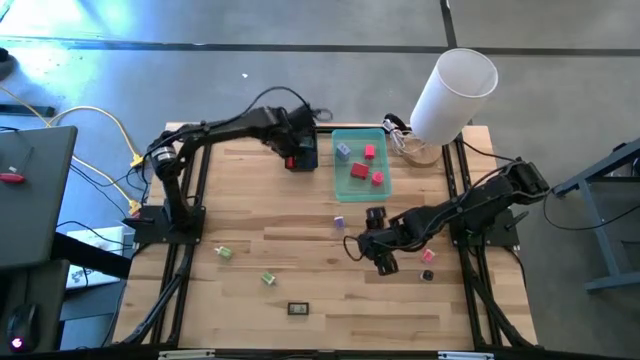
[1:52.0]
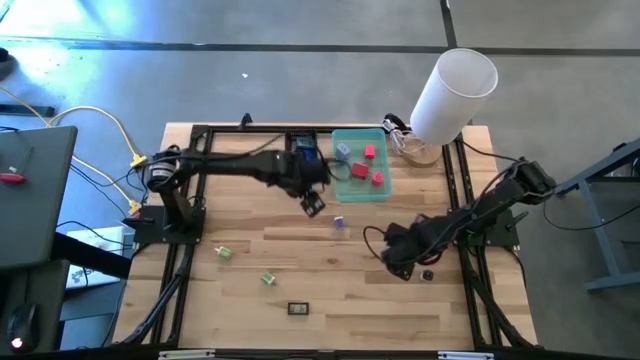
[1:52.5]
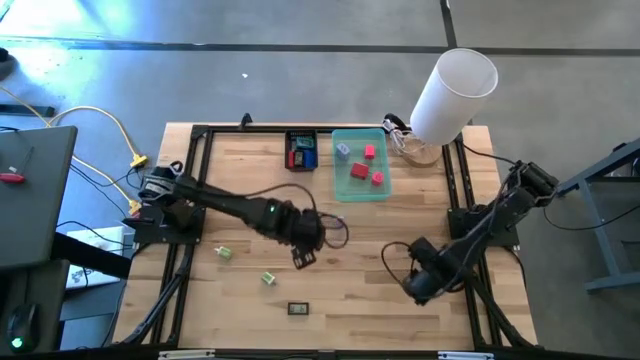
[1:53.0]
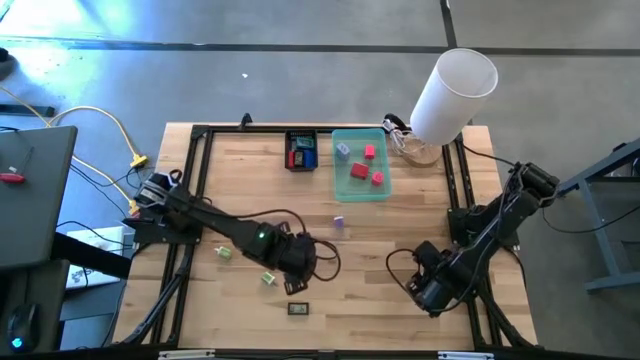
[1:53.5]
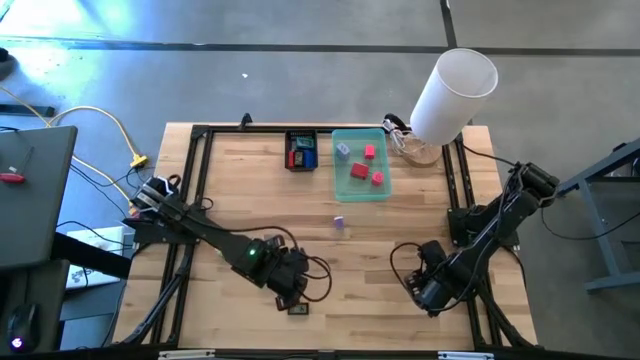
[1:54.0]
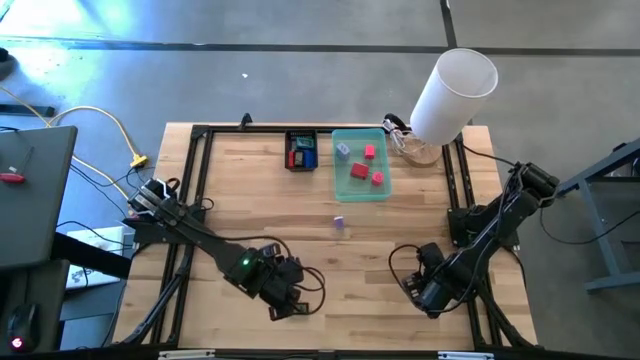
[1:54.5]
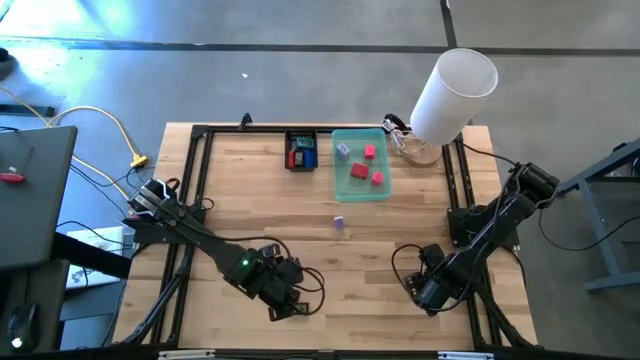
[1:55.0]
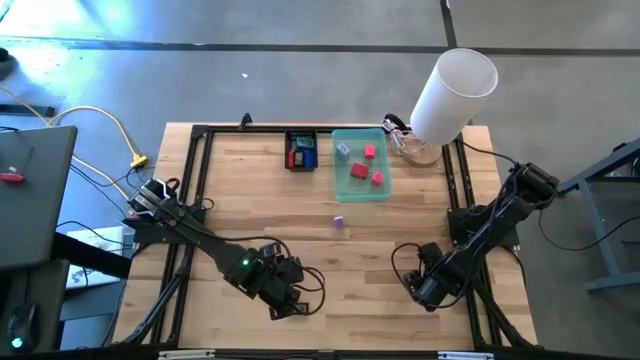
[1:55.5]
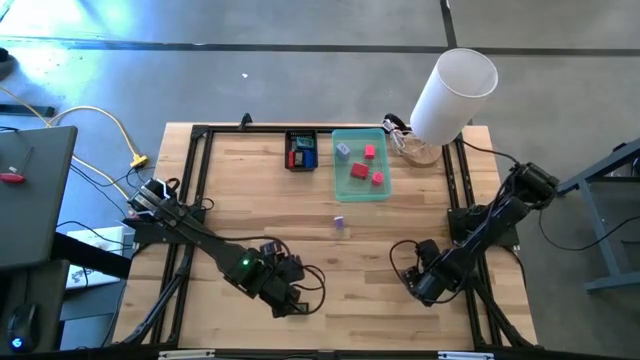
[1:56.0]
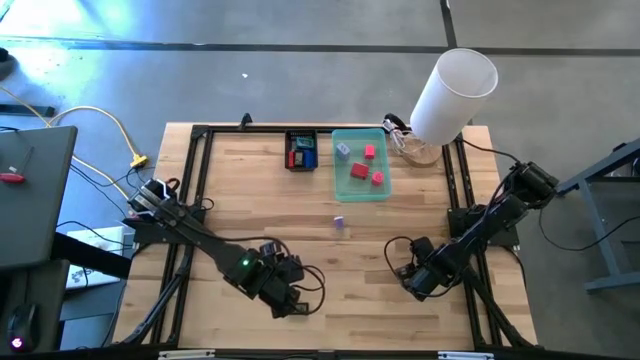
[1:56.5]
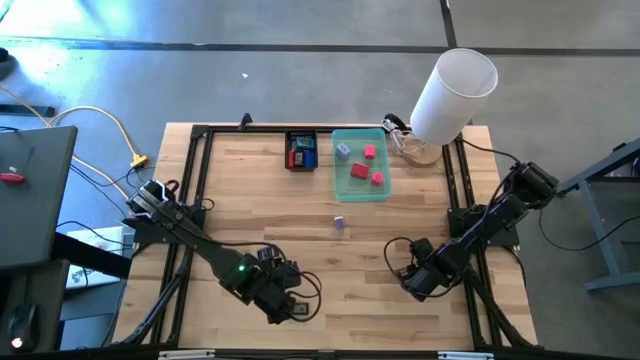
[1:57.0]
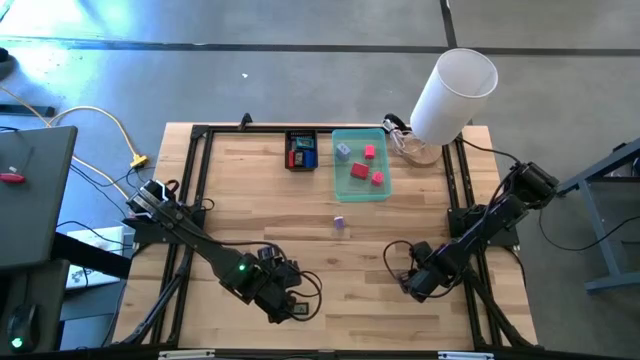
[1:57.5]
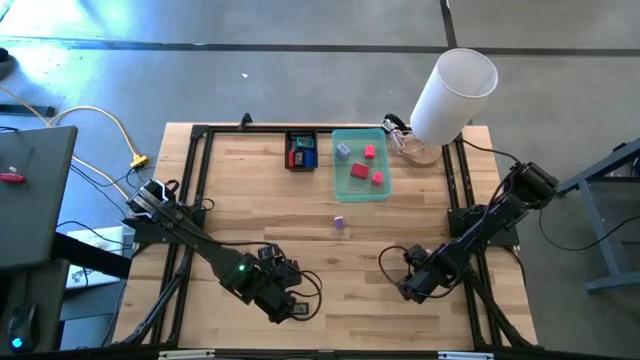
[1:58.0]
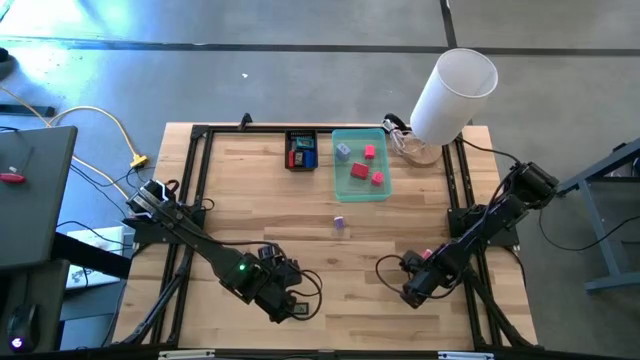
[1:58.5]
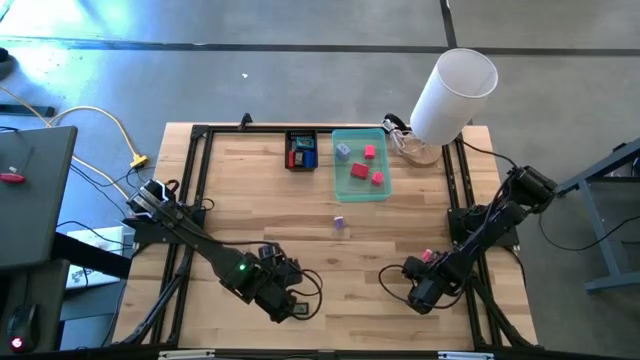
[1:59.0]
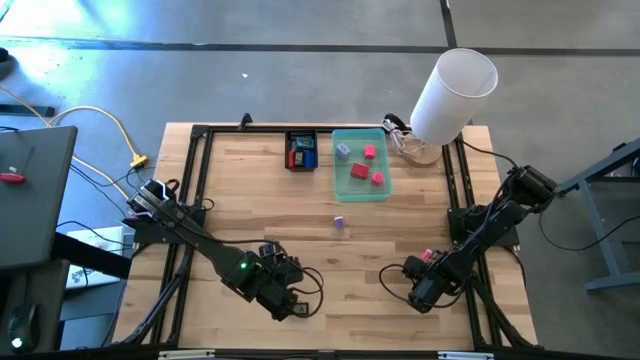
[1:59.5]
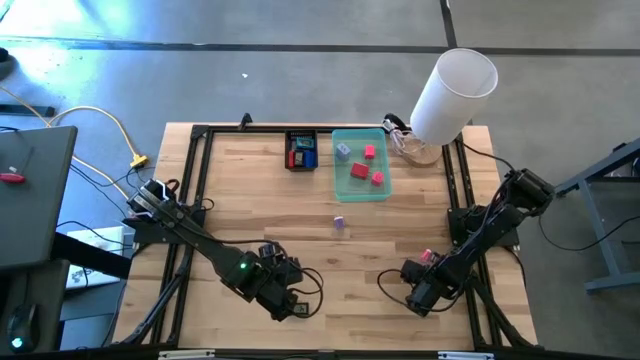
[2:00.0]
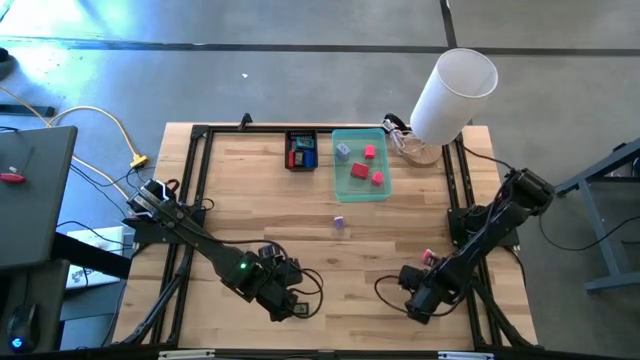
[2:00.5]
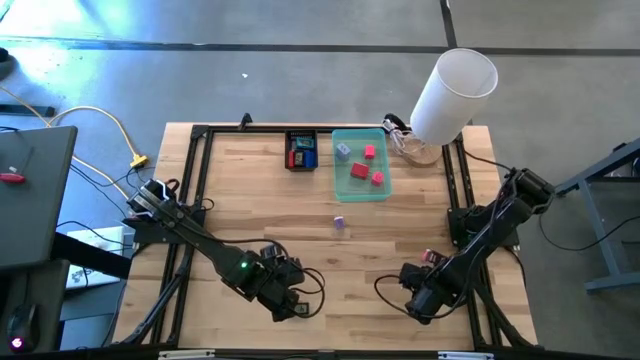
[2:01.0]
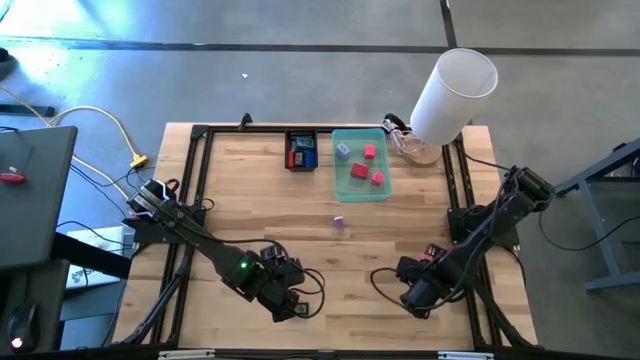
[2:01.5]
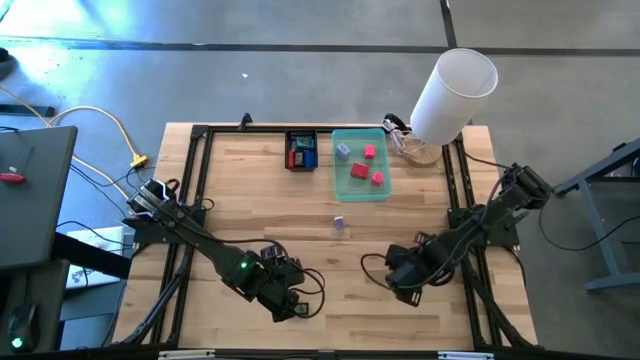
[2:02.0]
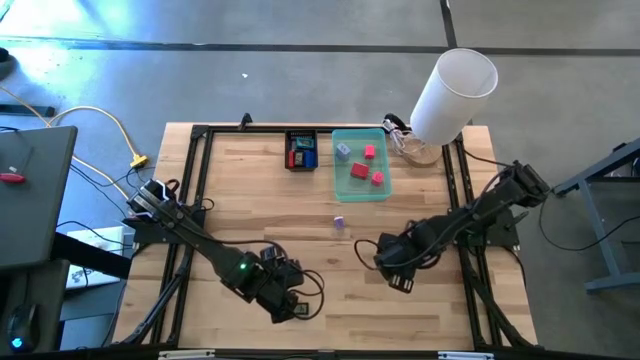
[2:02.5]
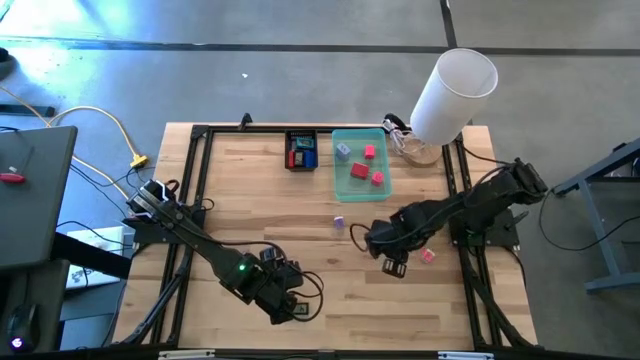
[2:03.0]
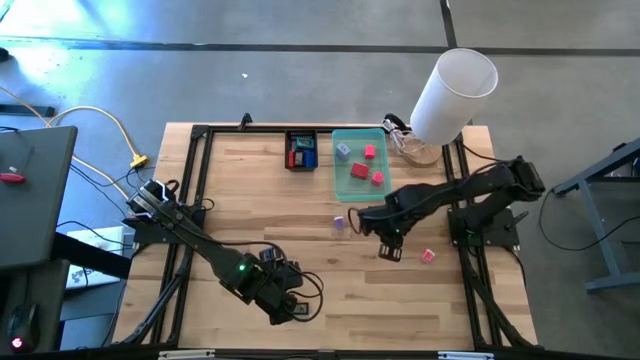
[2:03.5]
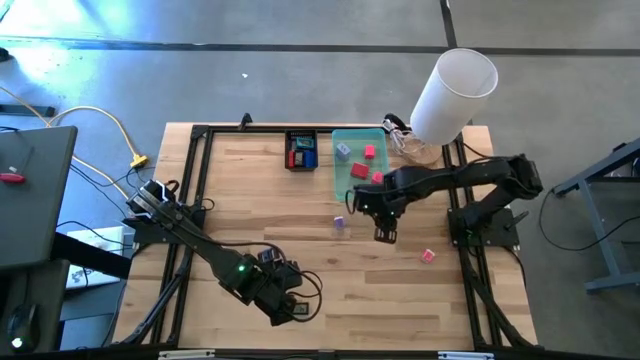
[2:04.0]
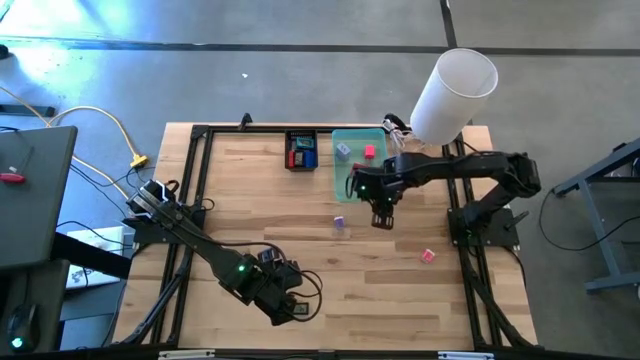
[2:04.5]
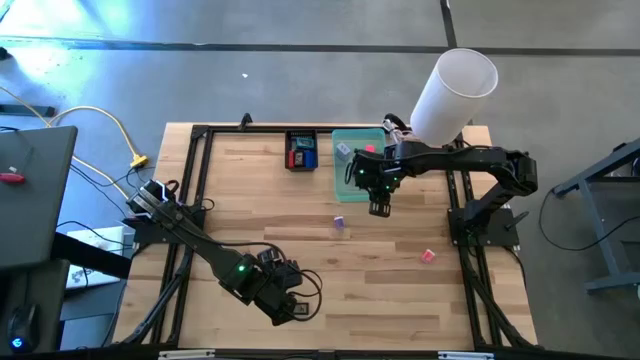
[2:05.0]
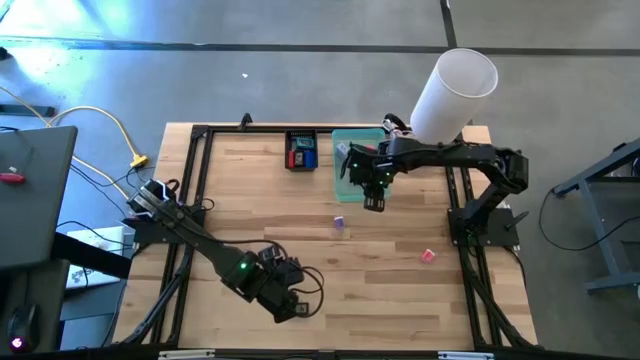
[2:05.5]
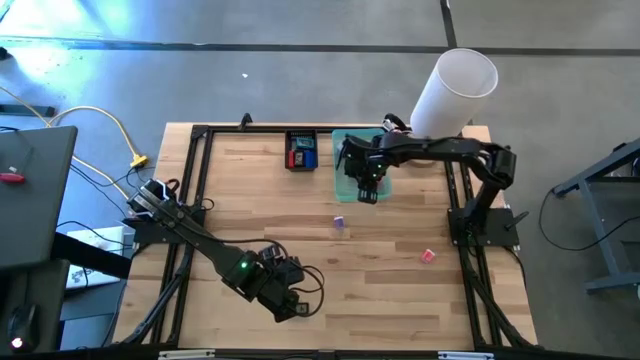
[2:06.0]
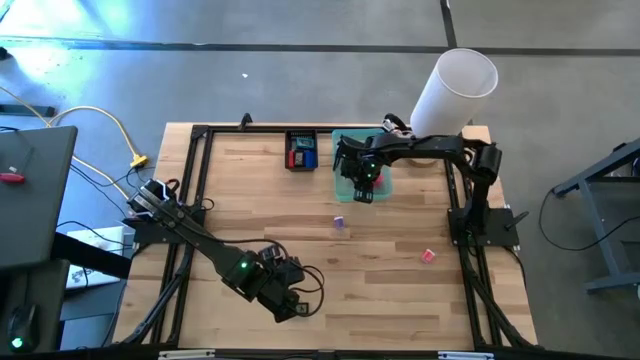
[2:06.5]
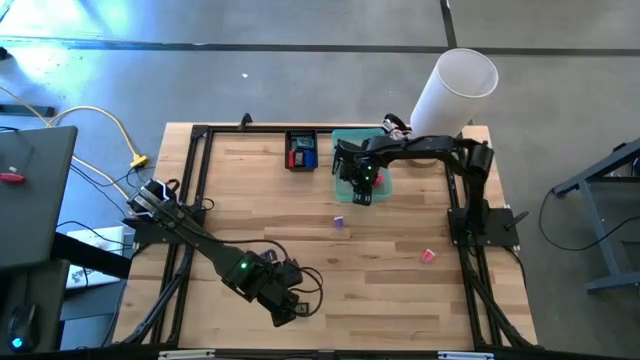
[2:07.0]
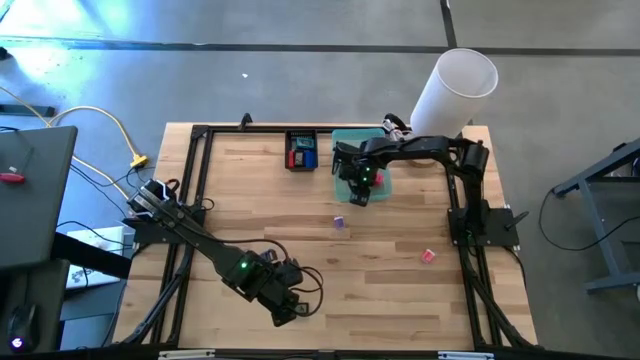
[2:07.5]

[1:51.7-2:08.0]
Task: Pick & Place Office items
Put the white charger adapter into the blue bin

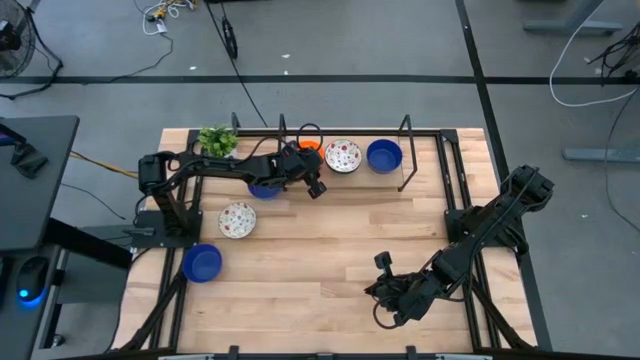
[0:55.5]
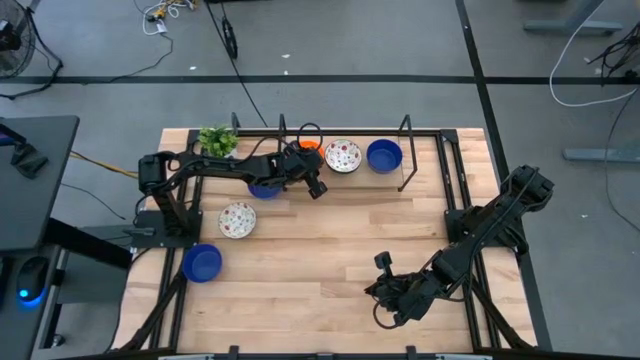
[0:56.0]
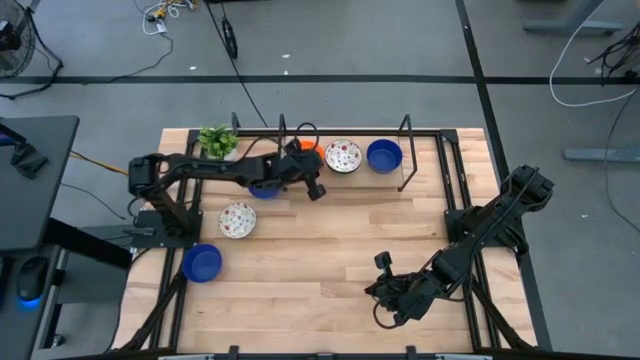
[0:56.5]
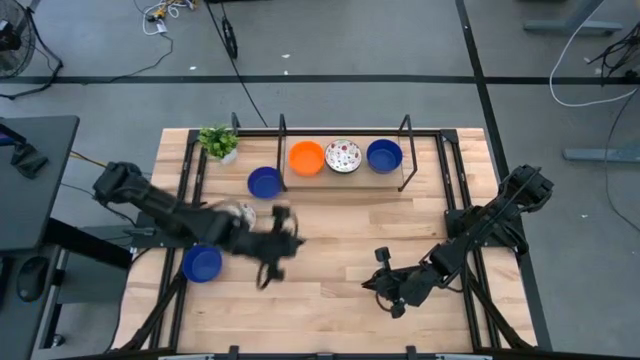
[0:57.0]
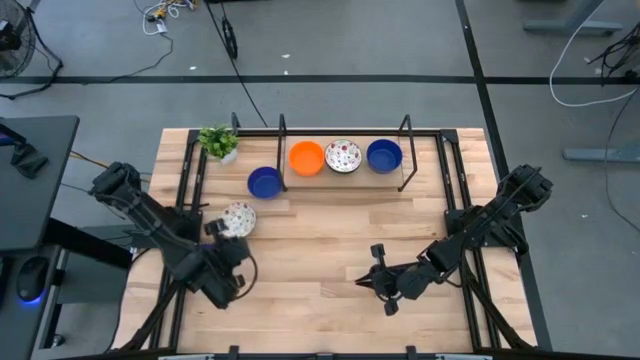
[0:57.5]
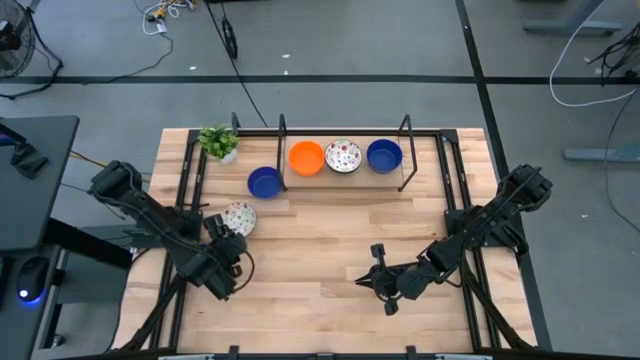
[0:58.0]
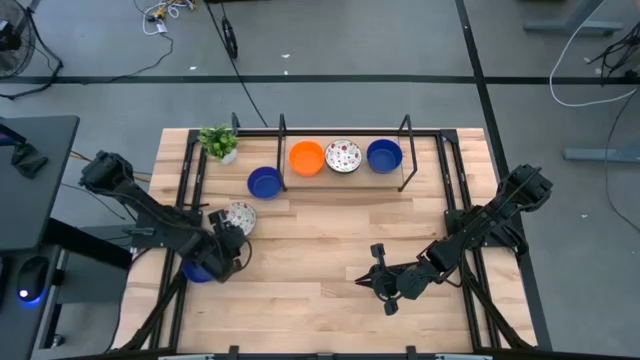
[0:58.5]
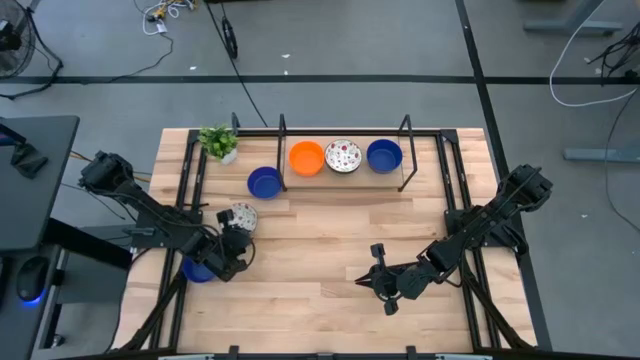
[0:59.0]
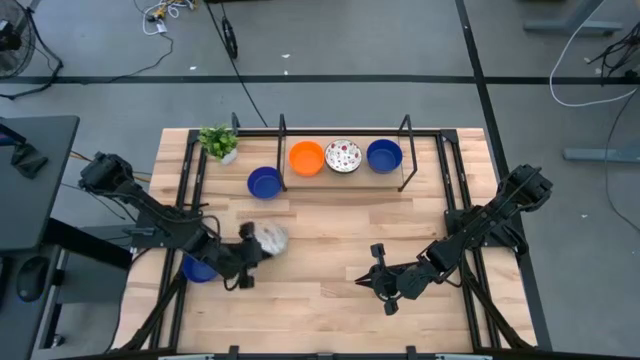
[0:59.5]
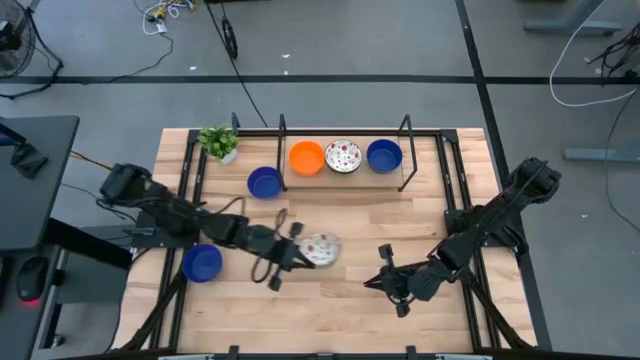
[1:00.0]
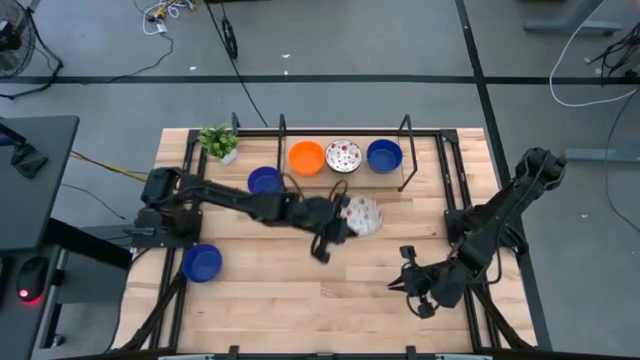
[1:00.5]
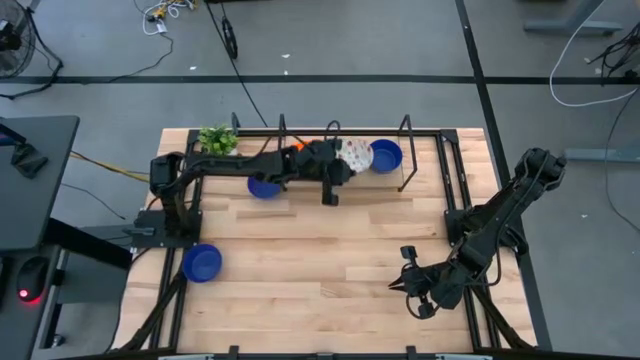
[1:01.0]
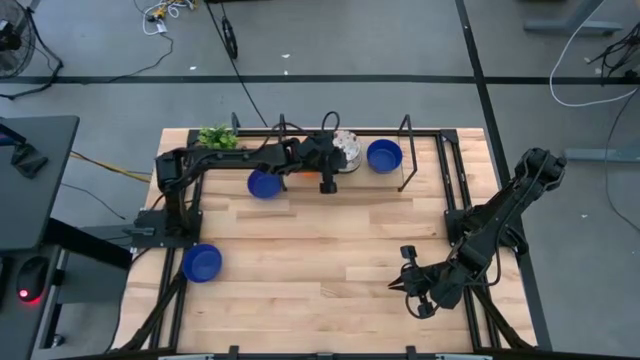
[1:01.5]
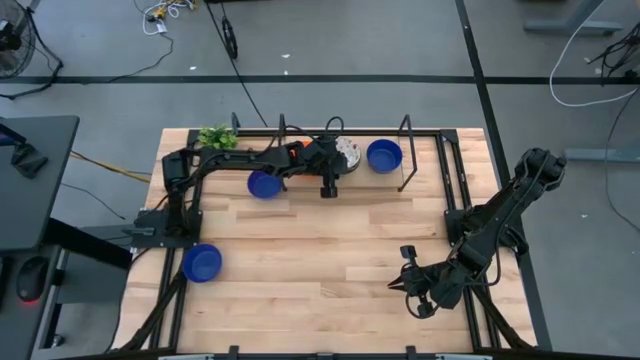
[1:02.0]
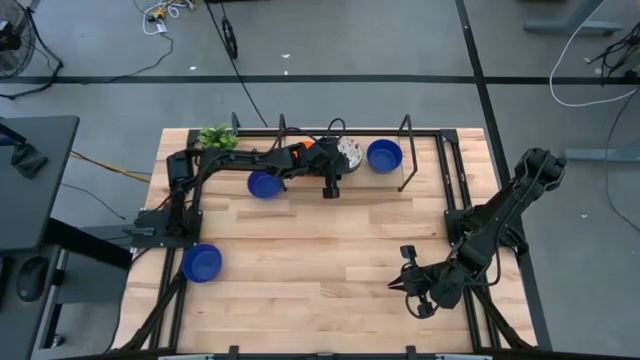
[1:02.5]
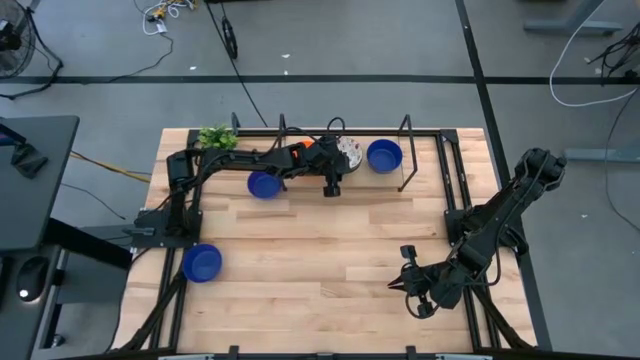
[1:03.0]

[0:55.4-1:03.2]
Task: Pick & Place Mini bowls
Stack the white bowl on top of the white bowl on the shelf
